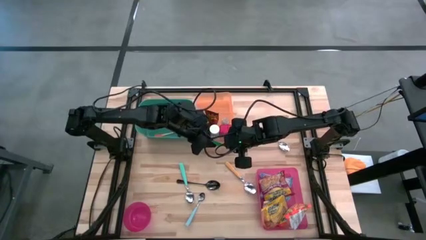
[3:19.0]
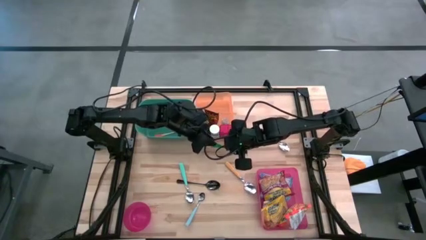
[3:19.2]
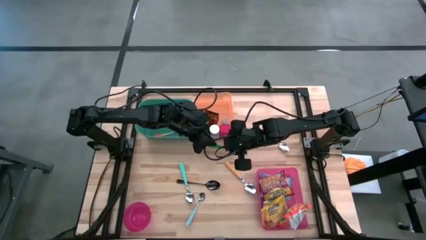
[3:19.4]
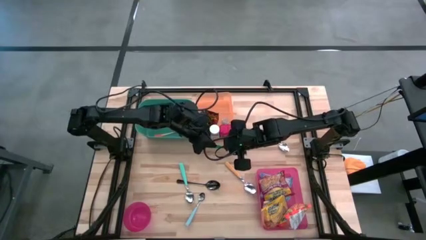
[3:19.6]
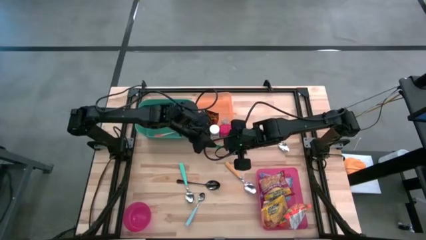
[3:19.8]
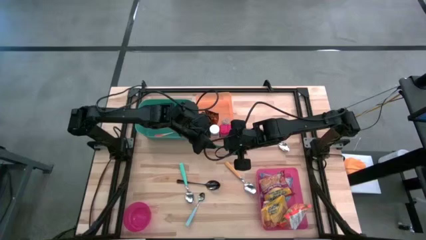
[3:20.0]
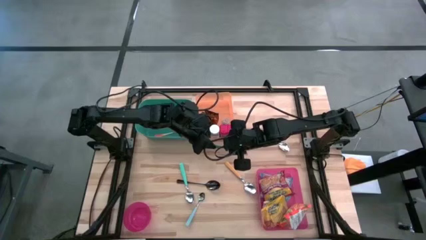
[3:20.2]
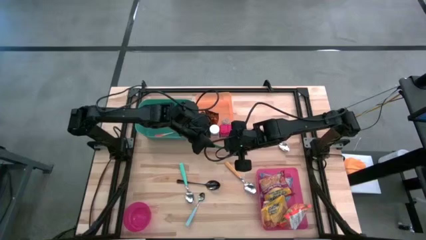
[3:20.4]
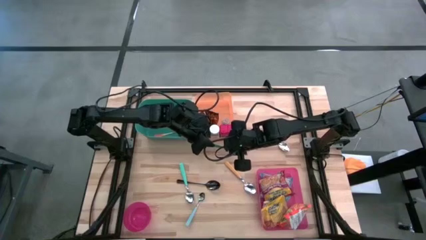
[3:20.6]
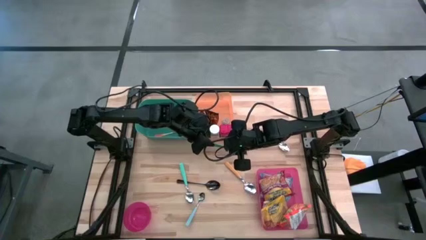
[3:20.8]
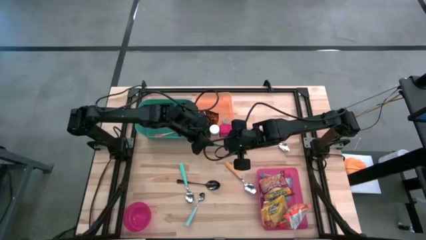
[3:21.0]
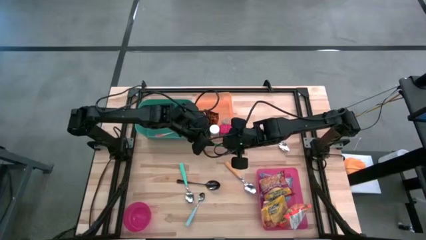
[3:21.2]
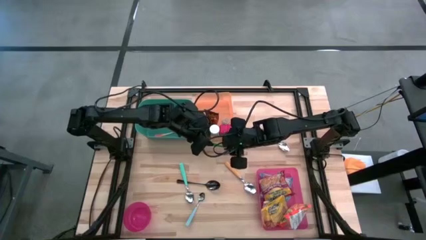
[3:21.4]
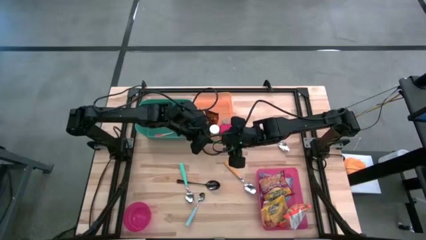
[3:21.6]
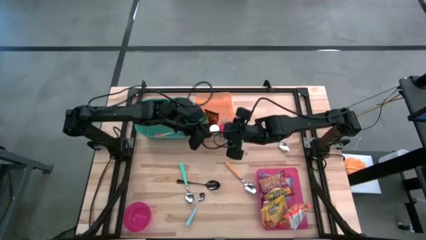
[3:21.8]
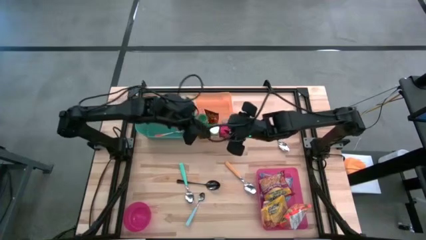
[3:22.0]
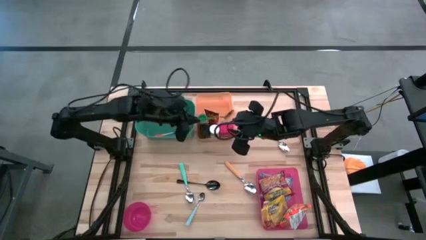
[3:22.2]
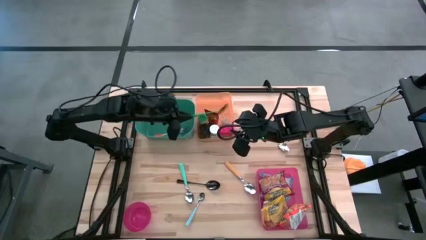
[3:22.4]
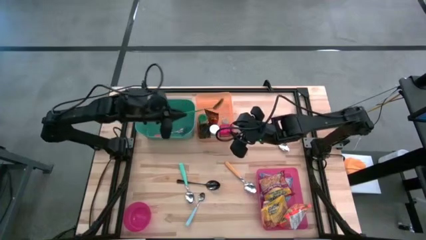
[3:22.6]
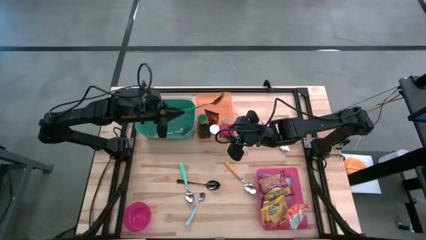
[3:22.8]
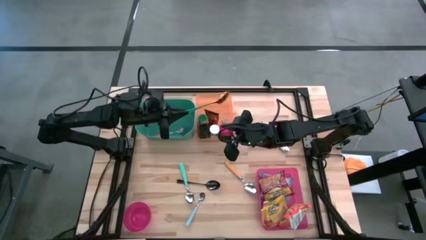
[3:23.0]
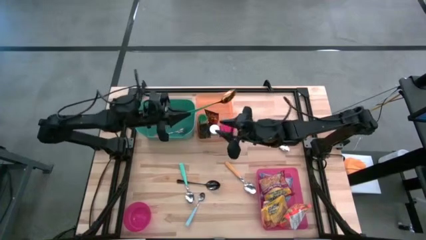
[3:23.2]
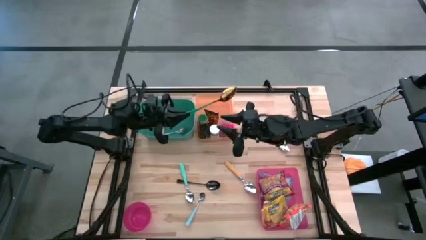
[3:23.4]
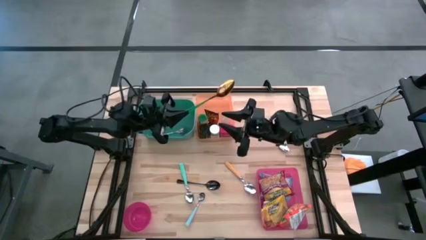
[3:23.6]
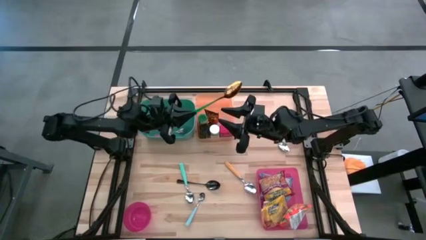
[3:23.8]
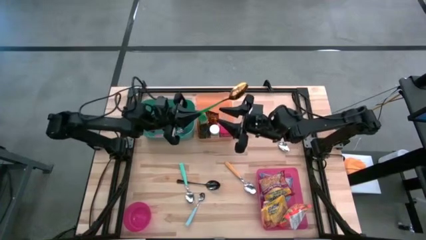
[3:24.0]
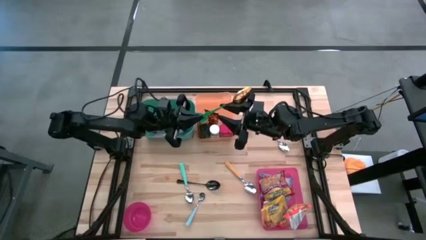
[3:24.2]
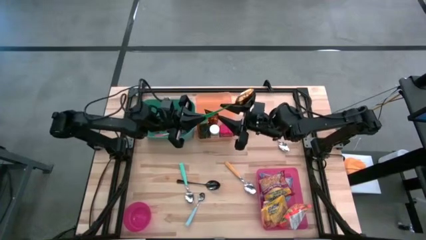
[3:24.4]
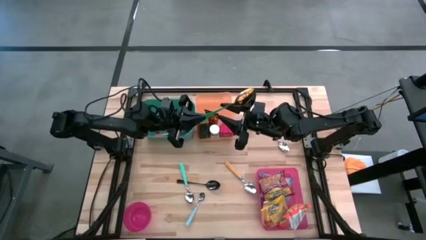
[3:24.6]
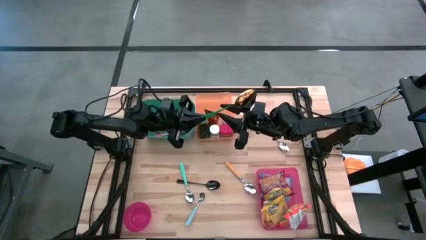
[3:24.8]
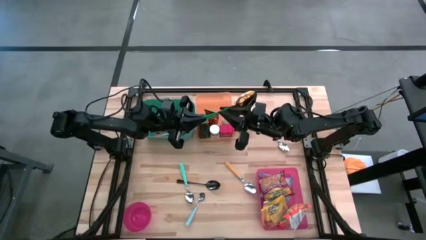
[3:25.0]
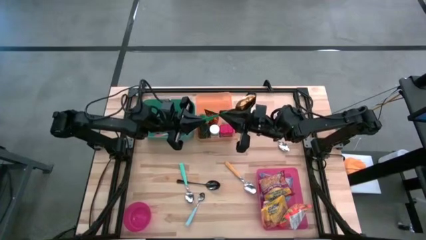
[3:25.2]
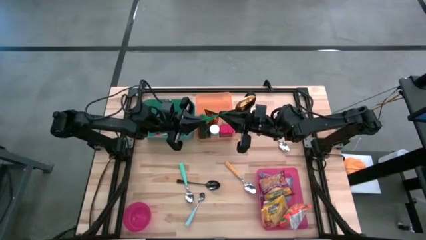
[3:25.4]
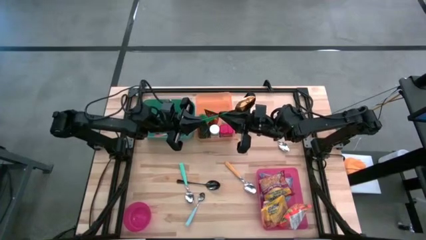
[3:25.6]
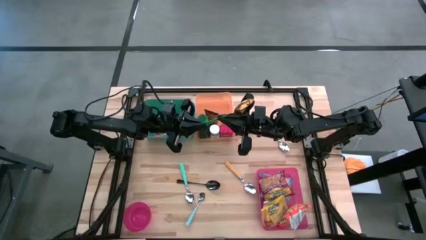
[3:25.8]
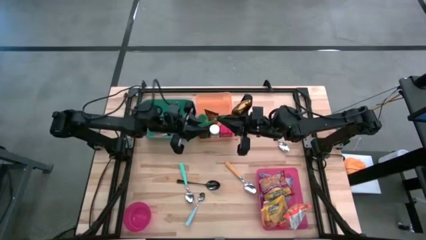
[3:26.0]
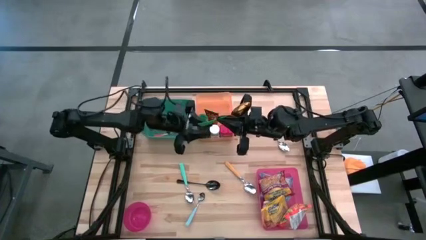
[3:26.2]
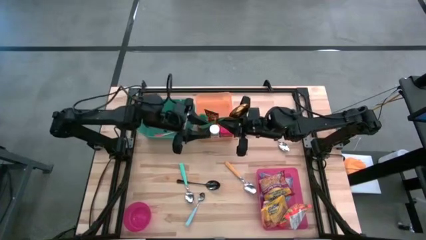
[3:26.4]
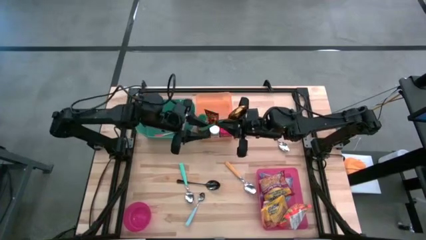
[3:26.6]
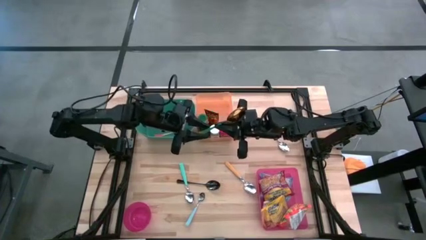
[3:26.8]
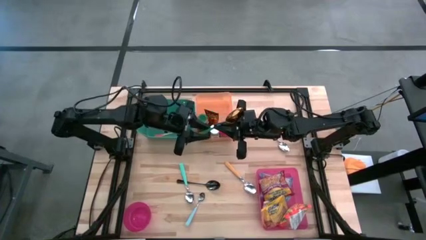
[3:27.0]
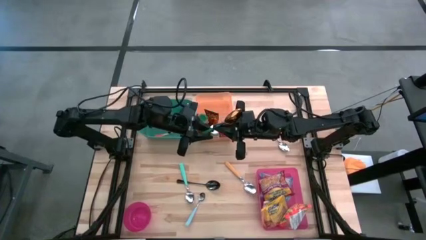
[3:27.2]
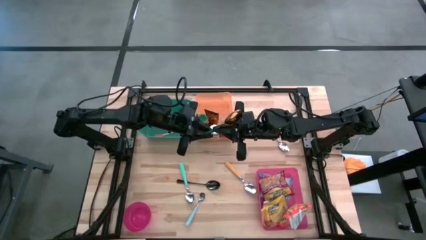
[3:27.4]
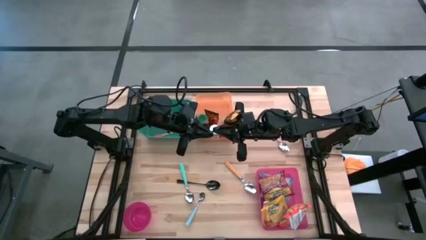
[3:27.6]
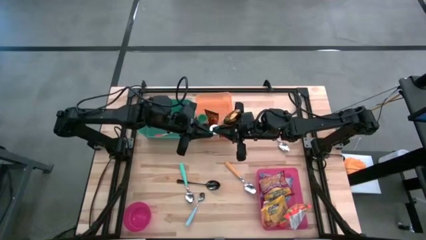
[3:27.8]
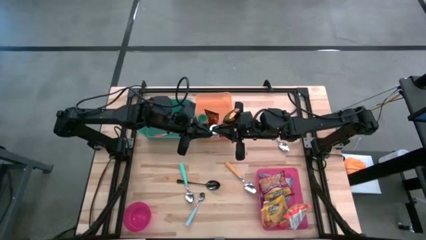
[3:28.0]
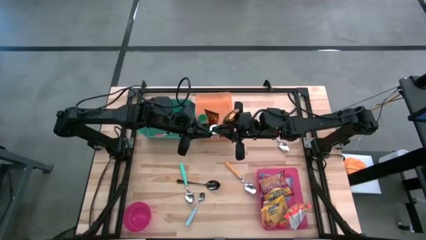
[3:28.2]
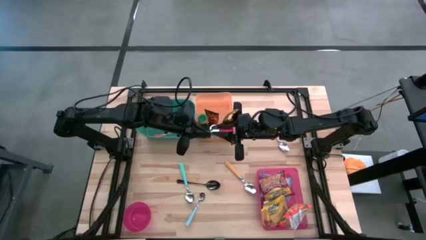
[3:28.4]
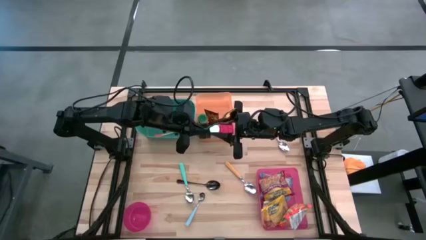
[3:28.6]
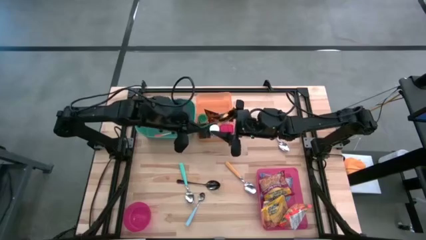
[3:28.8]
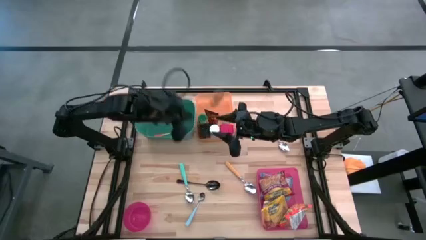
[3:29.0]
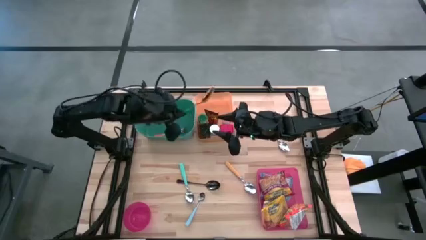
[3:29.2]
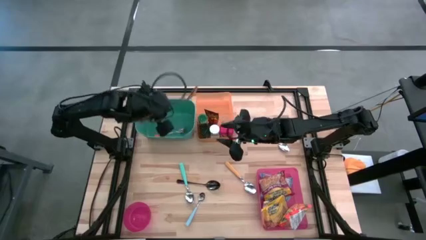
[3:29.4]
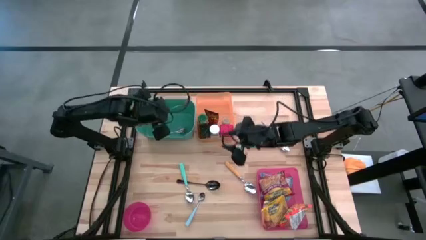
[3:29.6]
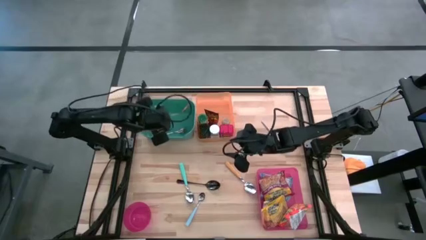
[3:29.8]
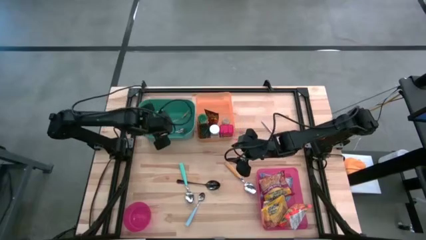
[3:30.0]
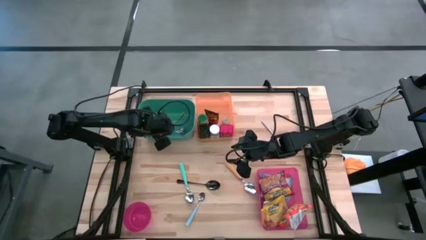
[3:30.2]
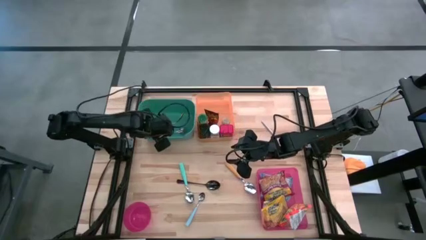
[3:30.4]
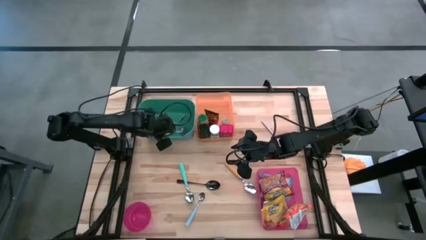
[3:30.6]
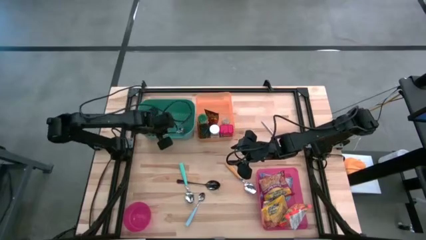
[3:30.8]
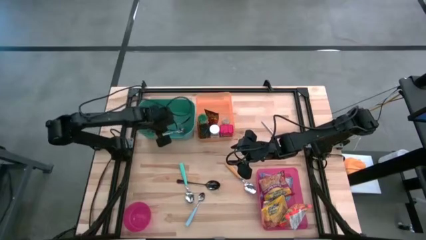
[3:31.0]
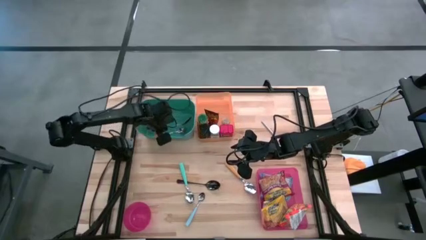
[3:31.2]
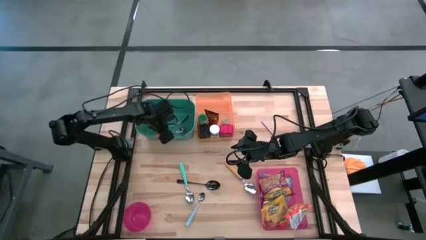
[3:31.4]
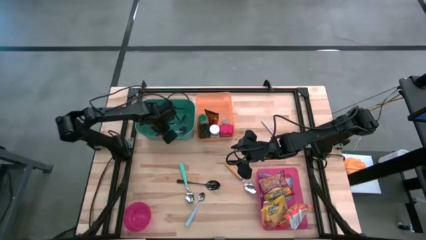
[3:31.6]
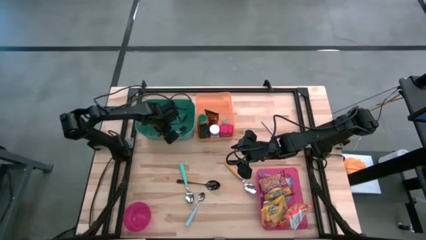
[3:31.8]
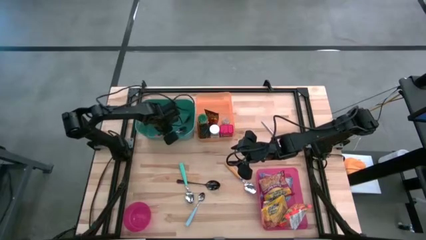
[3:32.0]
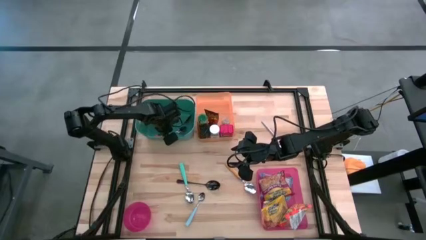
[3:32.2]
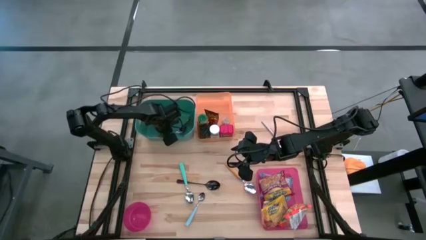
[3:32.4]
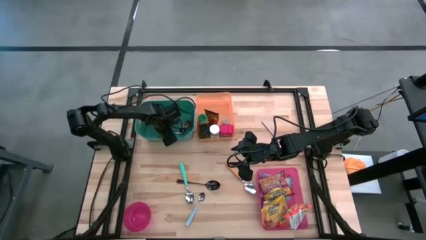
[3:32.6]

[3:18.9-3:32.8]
Put the green spoon into the green bin
